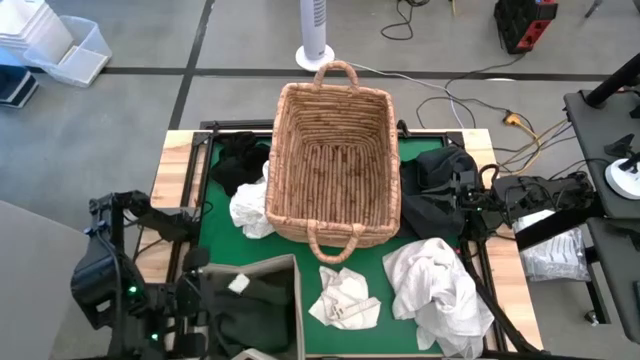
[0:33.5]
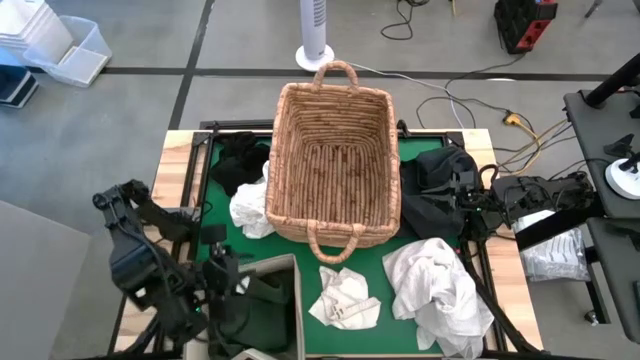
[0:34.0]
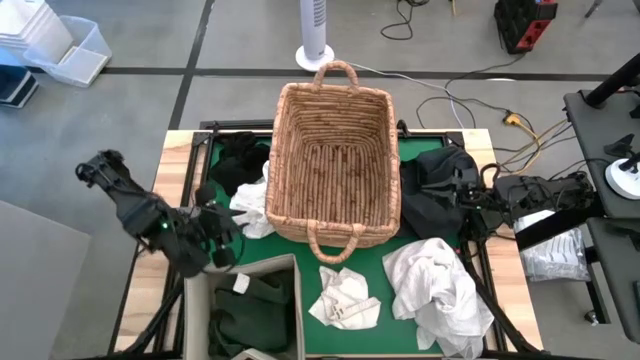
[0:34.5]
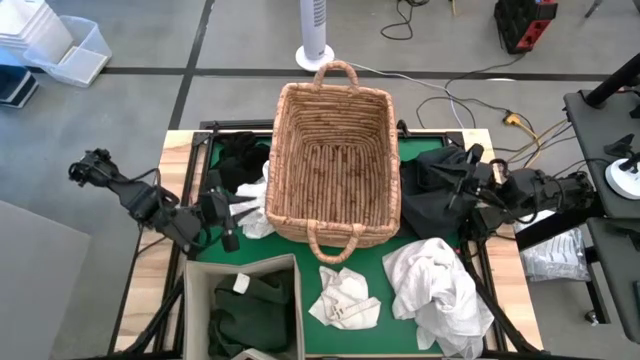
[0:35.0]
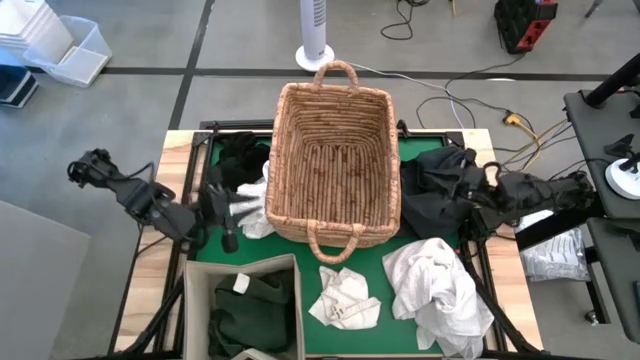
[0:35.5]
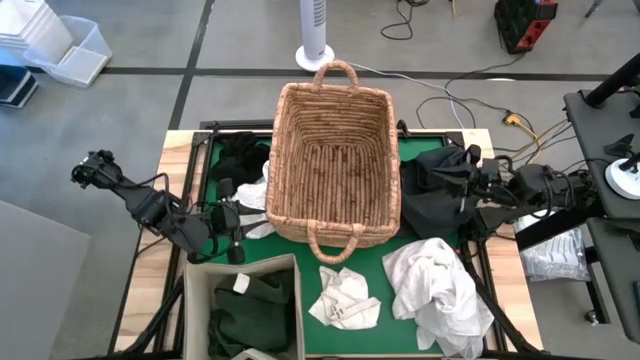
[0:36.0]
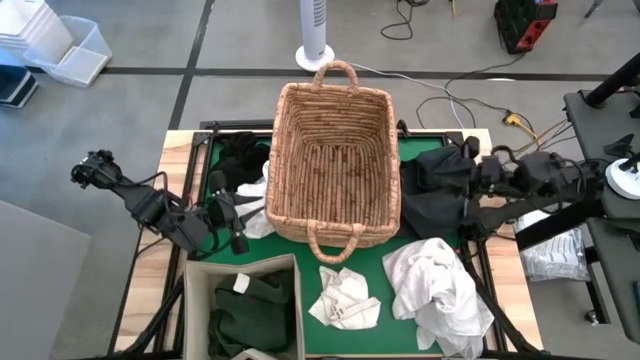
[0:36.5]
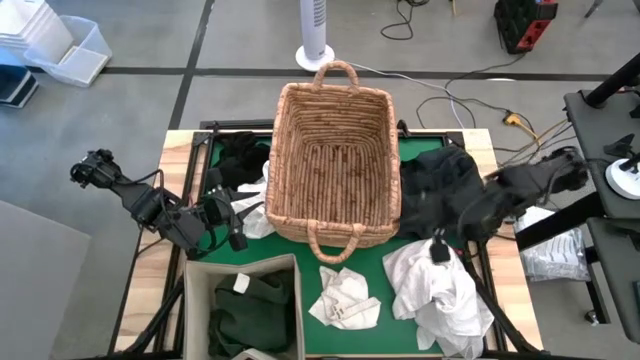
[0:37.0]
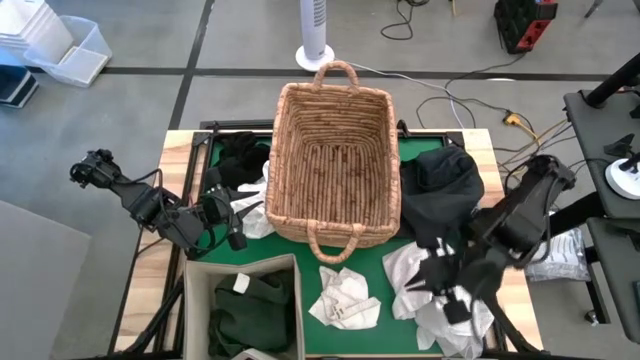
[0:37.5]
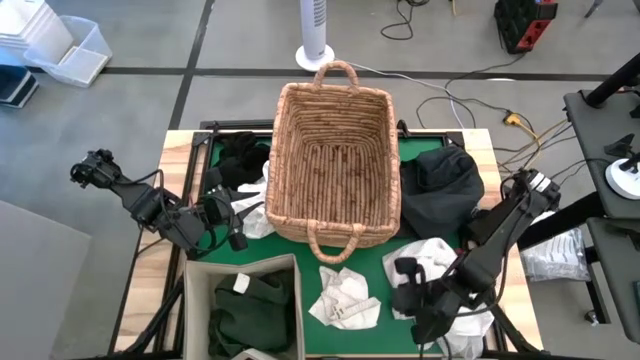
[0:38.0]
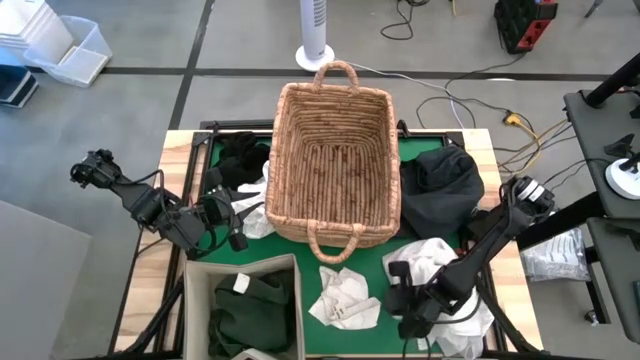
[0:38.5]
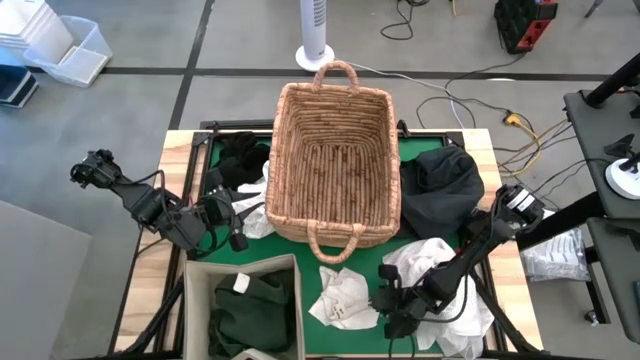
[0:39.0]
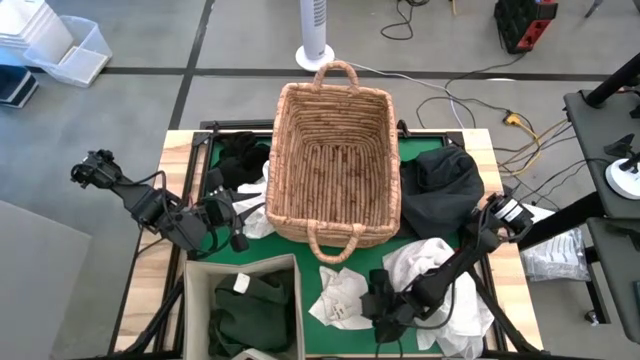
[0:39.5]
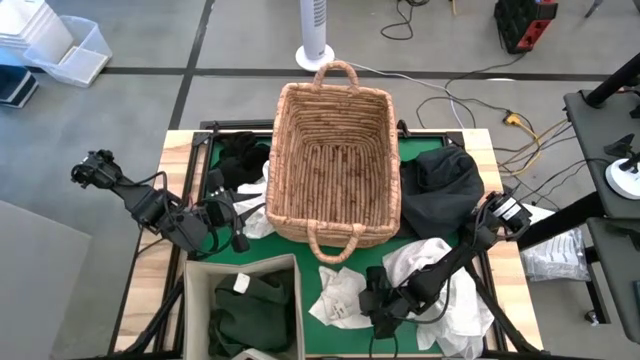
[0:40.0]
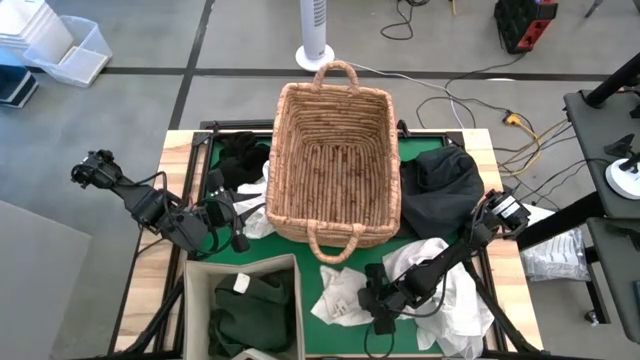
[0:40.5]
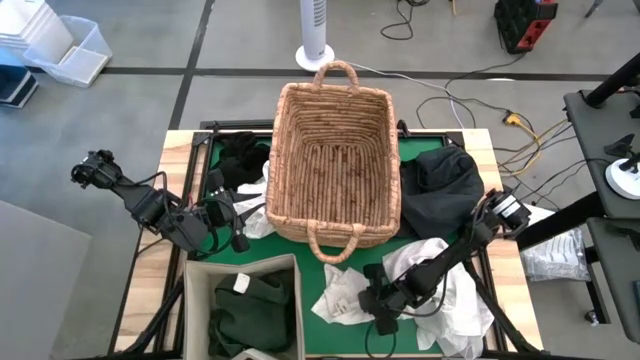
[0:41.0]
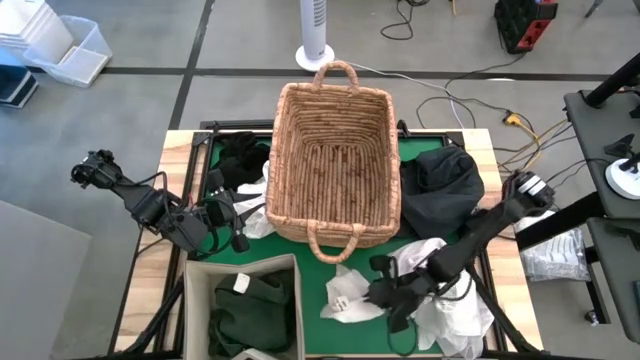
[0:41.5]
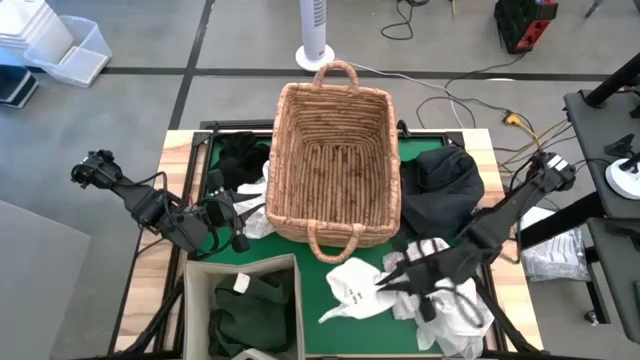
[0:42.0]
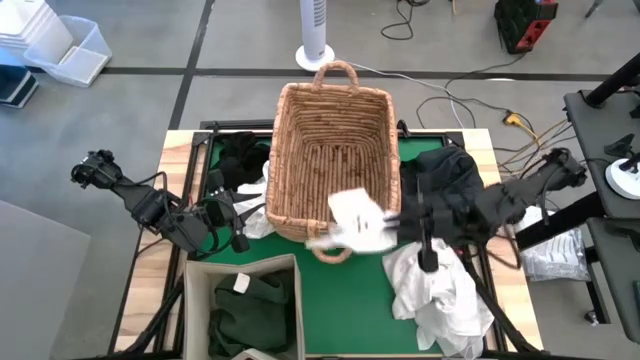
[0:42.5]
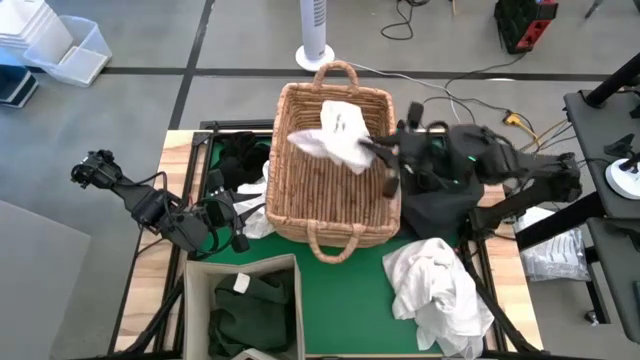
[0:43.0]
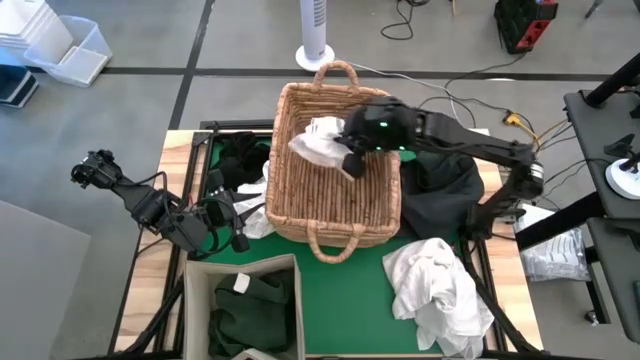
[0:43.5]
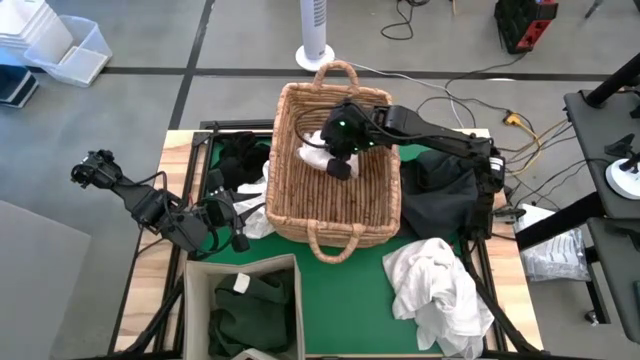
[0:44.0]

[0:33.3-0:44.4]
Put the middle white shorts into the brown laundry bin
